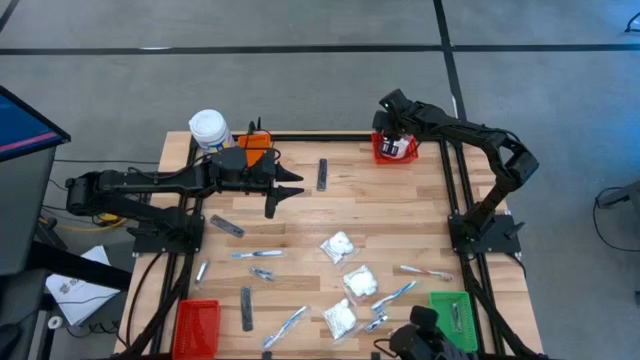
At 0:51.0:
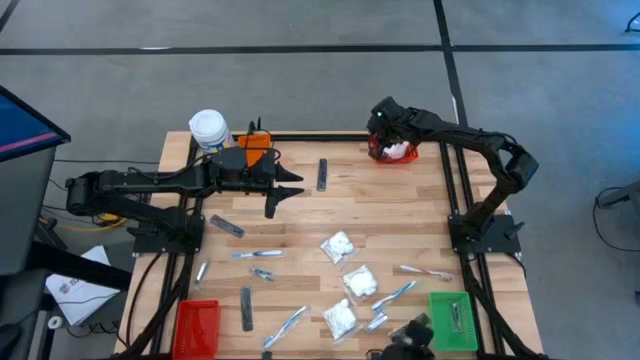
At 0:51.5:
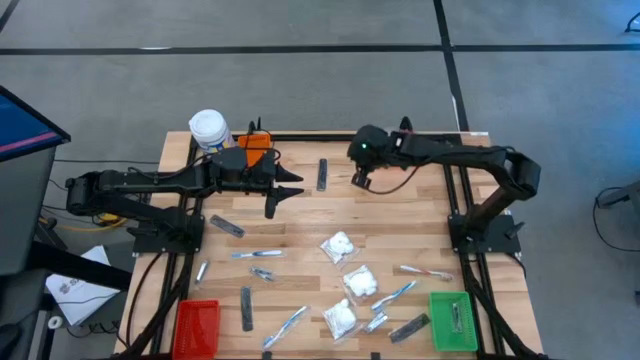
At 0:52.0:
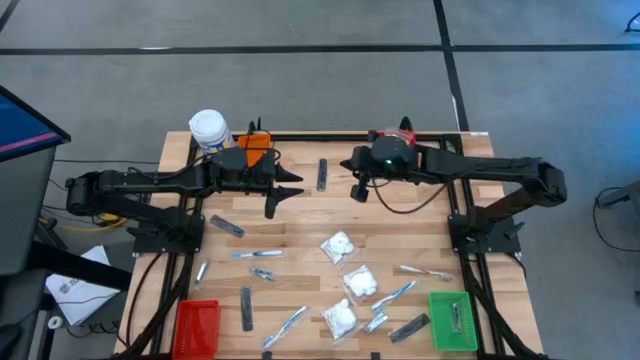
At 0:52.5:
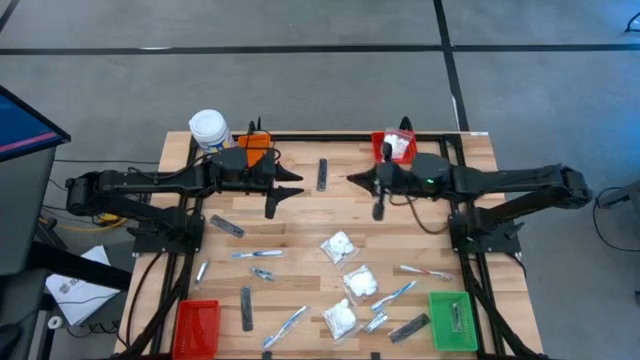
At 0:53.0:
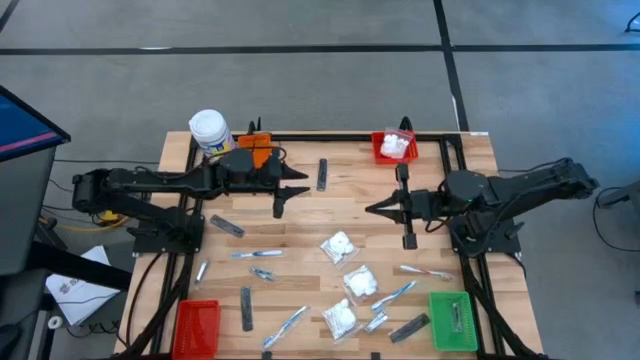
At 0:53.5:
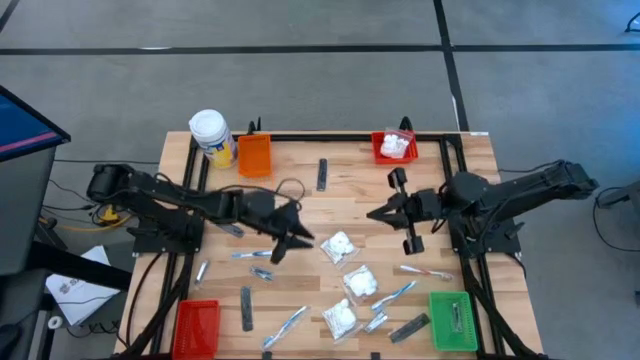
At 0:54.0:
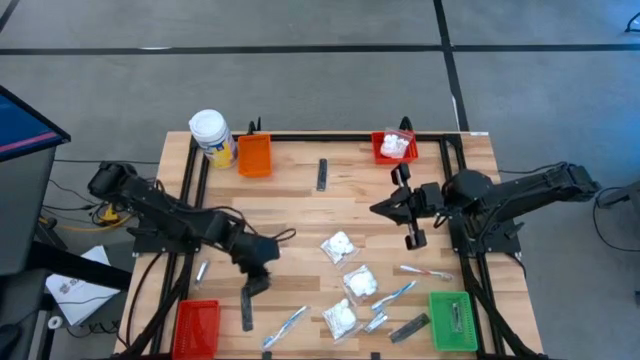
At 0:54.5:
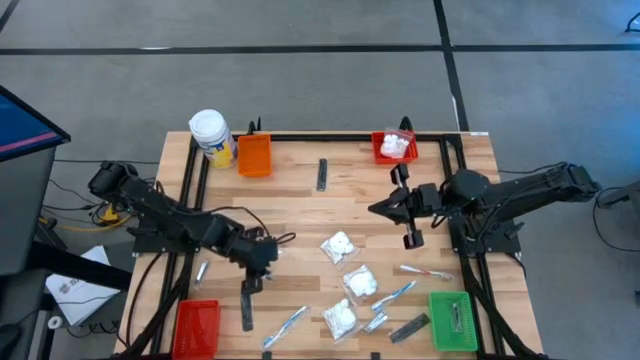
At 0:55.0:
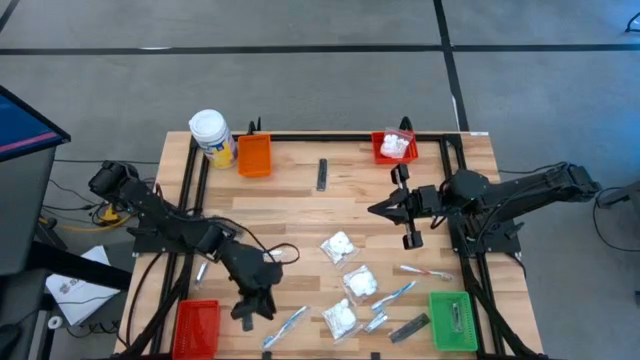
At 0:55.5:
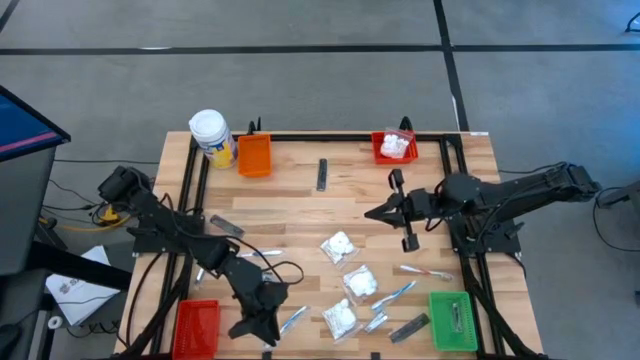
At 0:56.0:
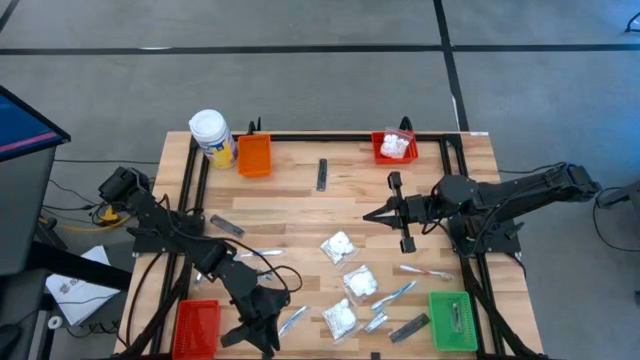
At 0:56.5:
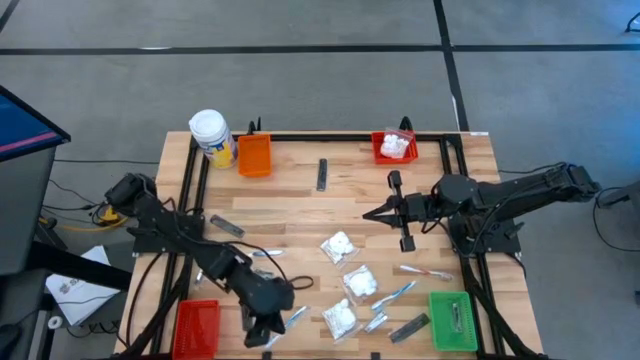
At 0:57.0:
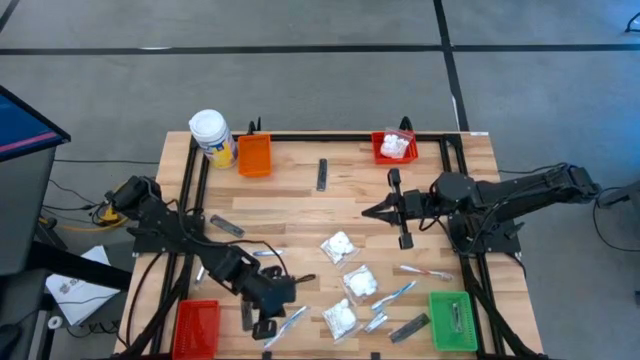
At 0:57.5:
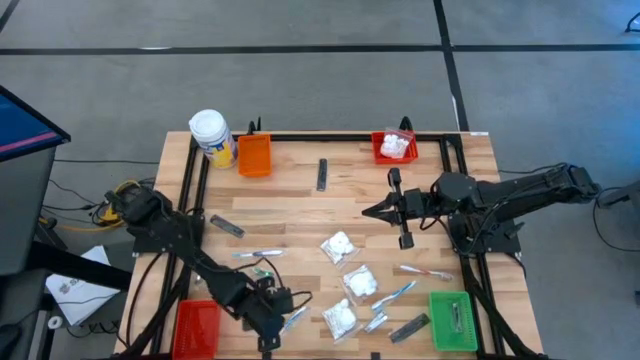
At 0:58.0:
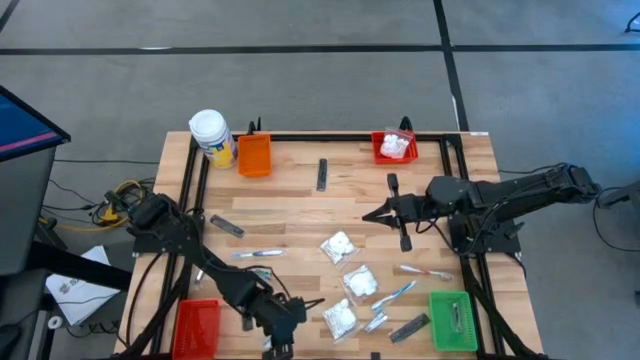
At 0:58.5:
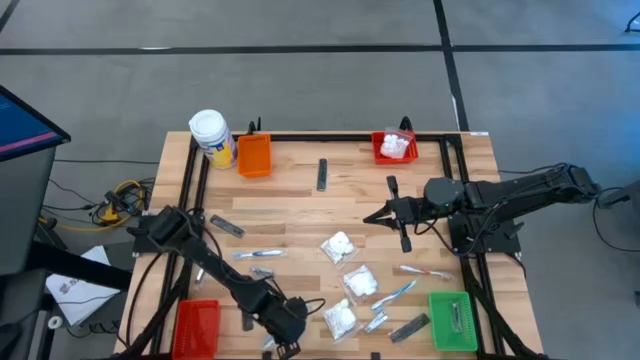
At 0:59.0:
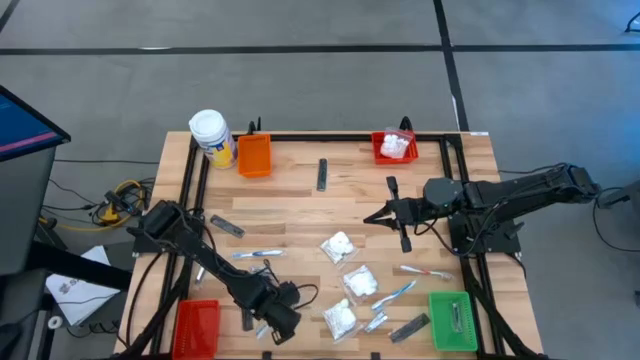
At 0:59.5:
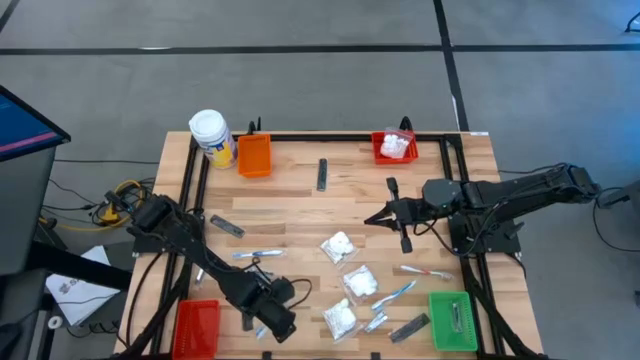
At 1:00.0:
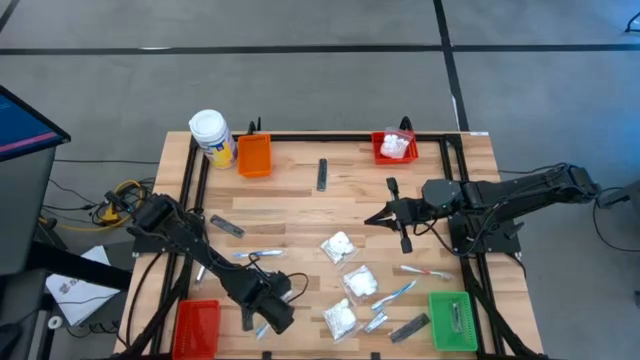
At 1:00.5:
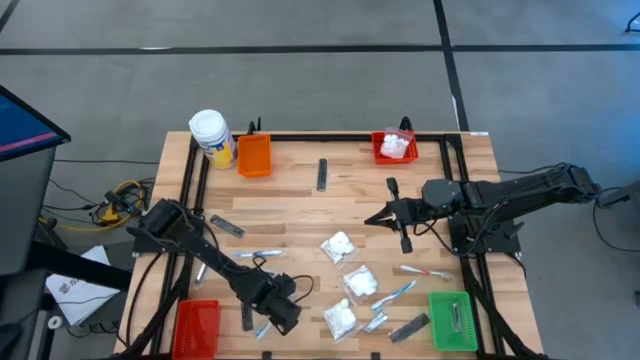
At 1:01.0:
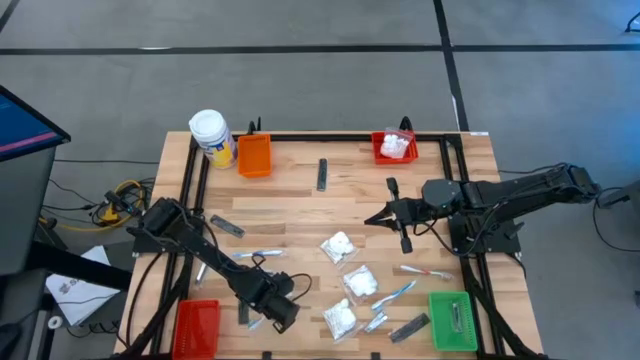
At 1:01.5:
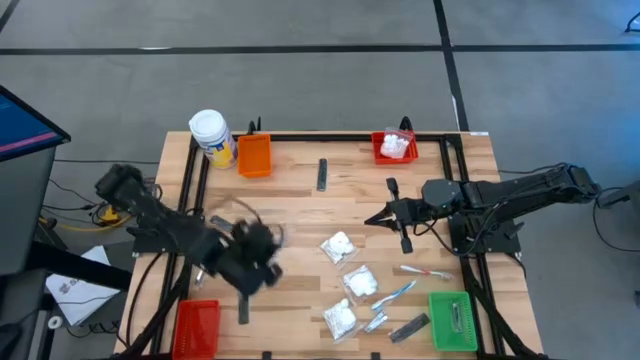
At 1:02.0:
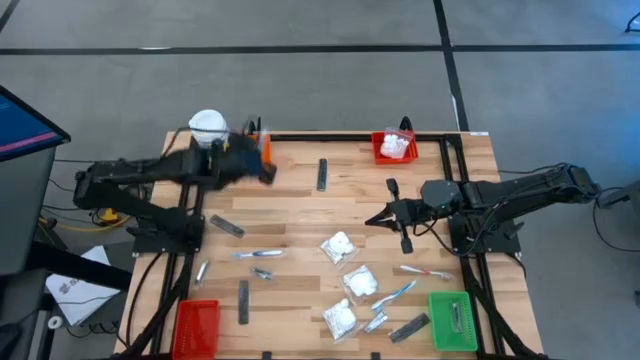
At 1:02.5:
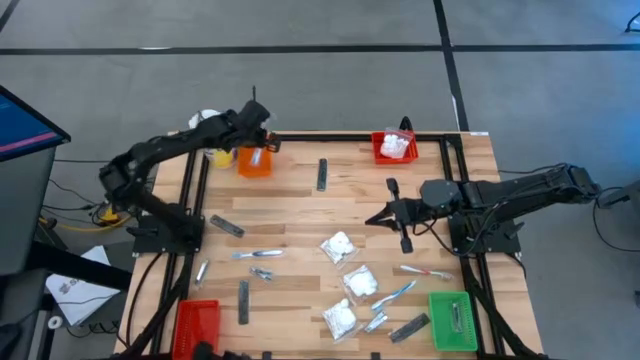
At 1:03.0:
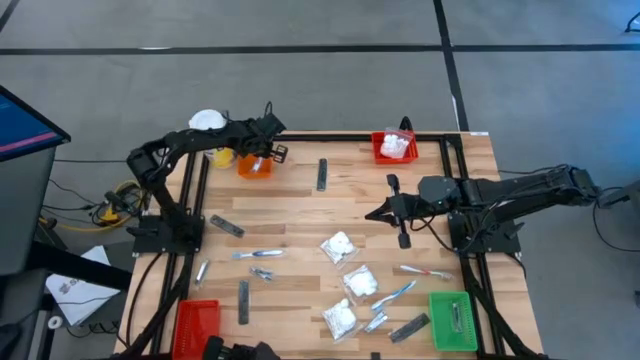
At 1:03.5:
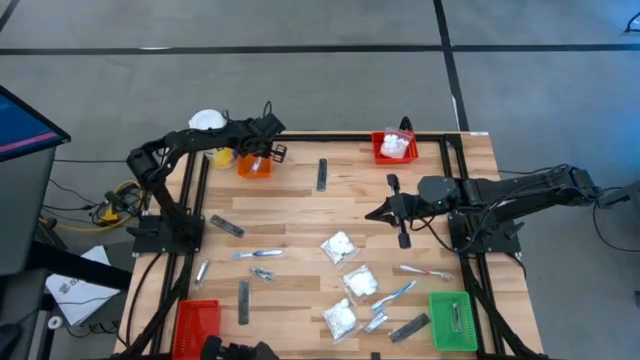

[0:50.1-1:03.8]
Task: Pick & Place Travel size toiletries
Put the blue toothbrush into the orange bin

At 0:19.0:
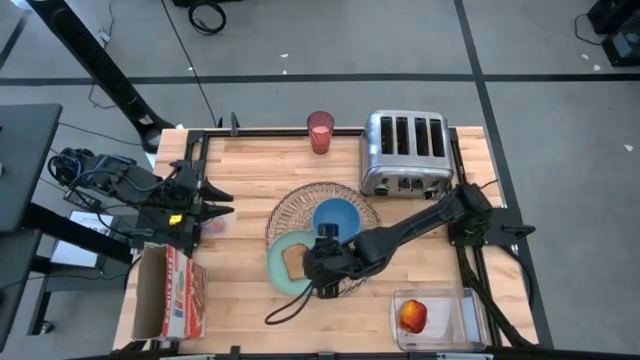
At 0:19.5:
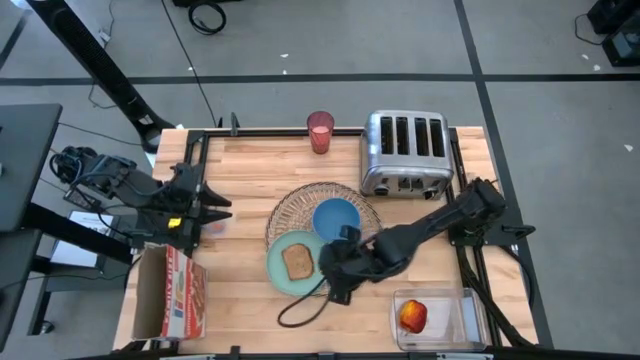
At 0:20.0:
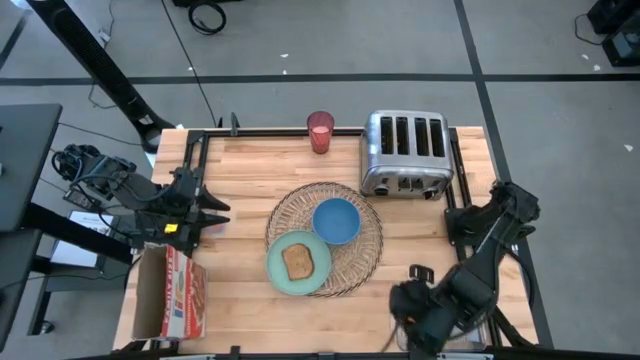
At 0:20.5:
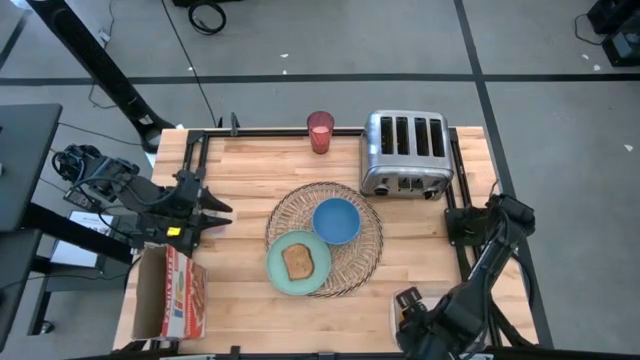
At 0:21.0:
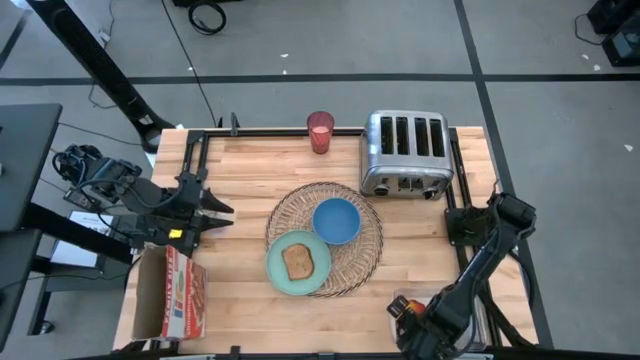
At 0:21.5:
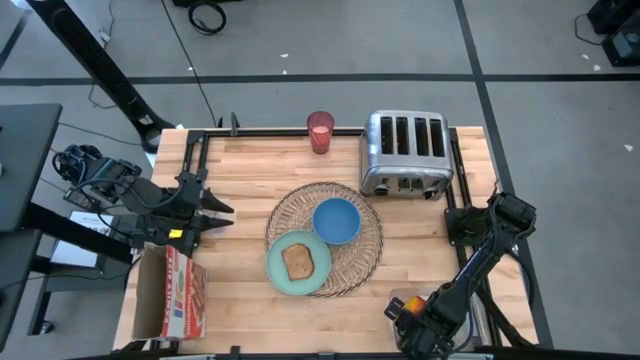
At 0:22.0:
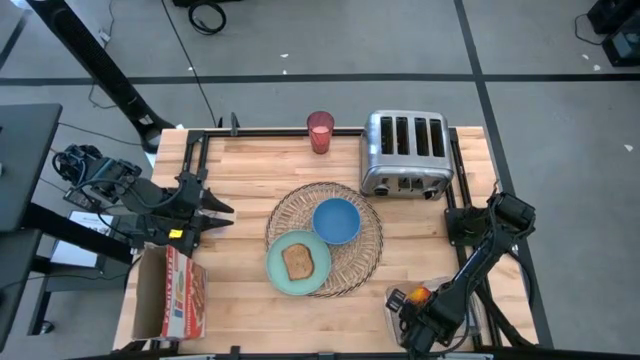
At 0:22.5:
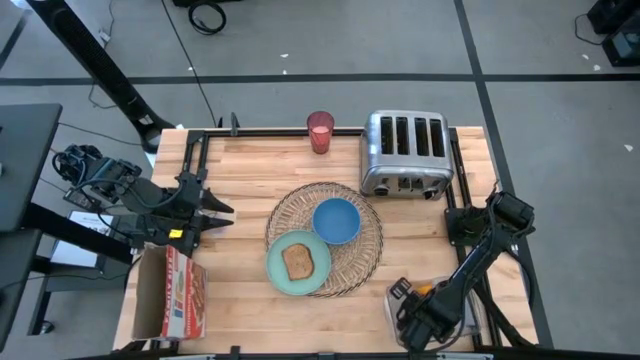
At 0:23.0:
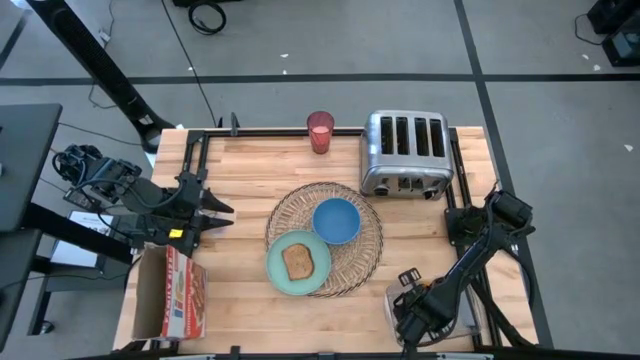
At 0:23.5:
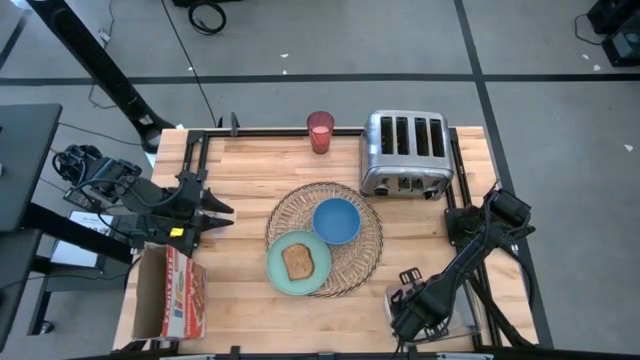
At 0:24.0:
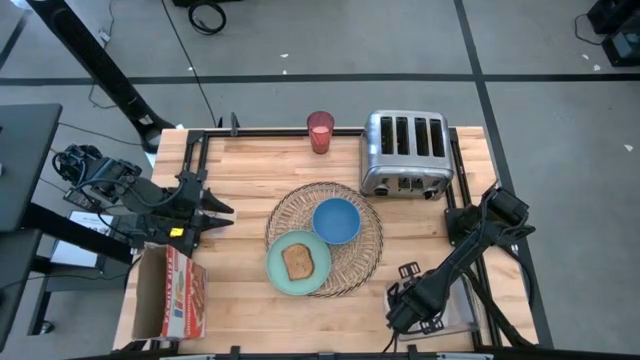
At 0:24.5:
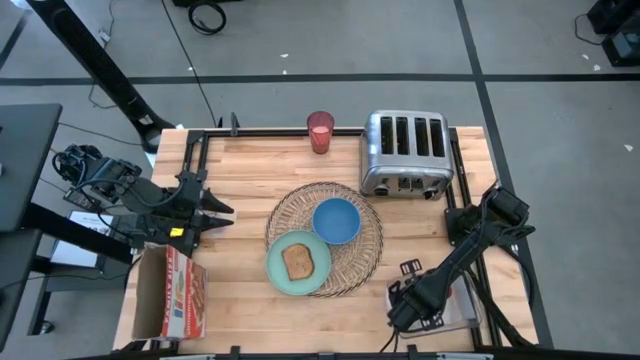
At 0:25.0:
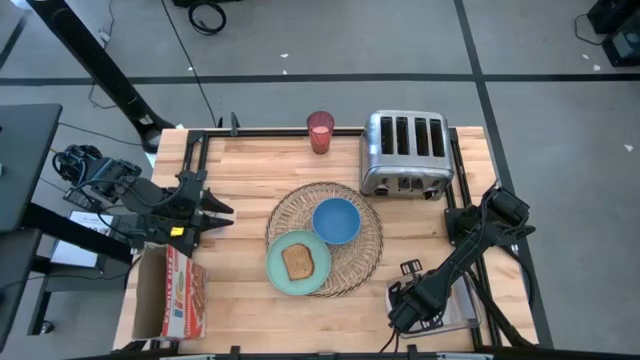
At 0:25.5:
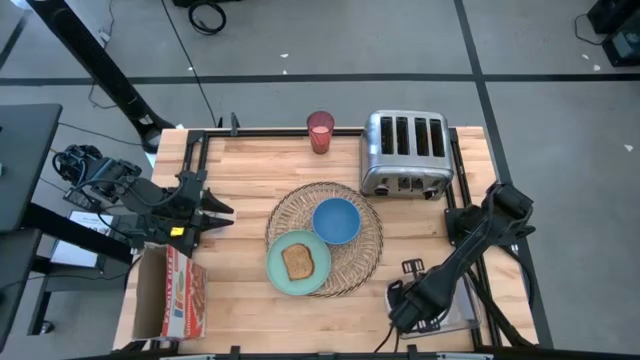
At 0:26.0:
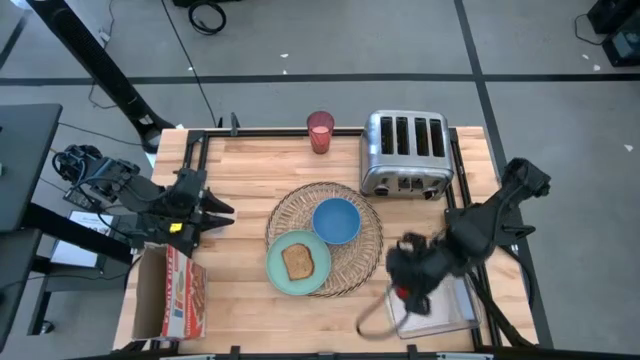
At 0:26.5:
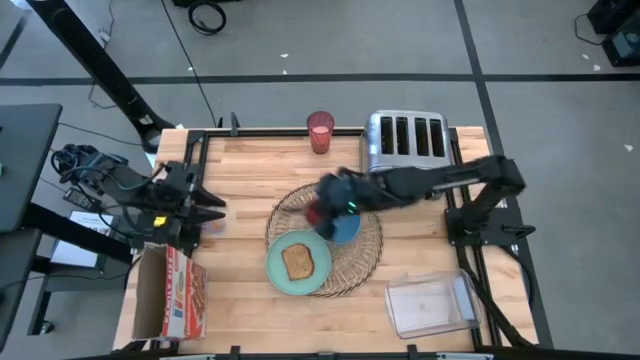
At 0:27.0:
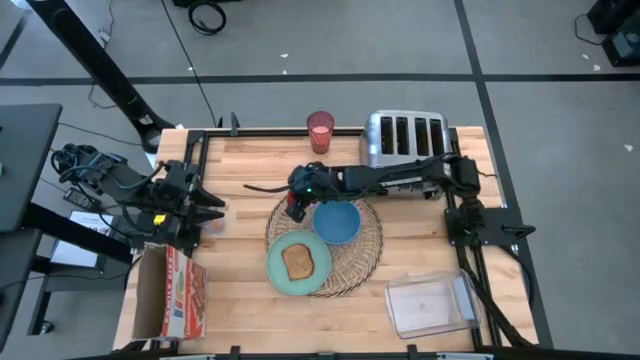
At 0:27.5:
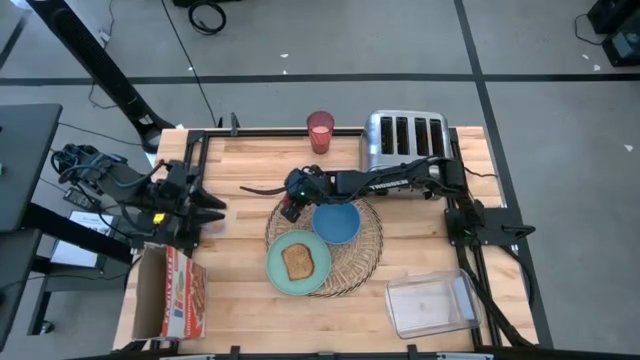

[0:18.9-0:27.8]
Task: Arrange a breakfast setting
Put the apple on the placemat to the top left of the blue bowl
